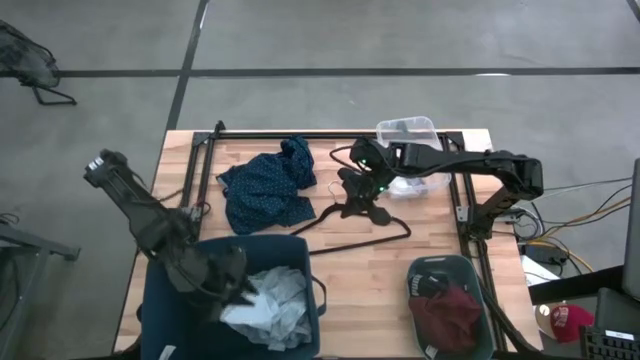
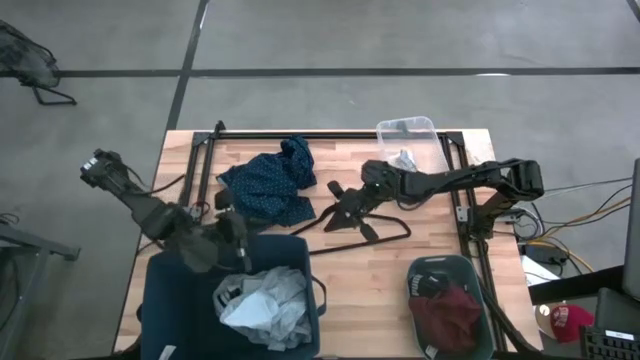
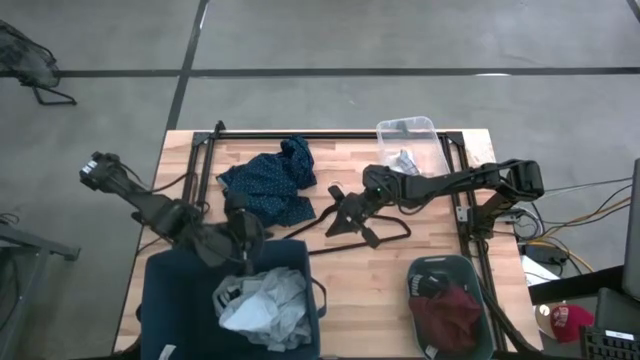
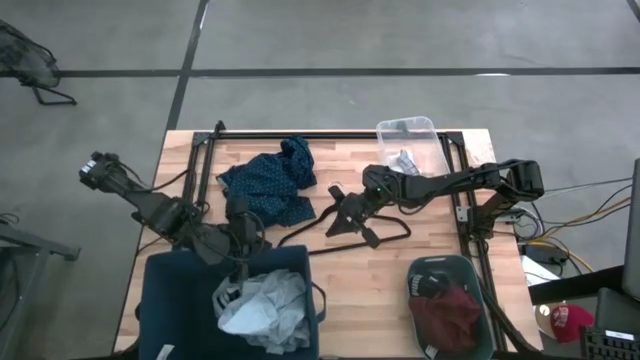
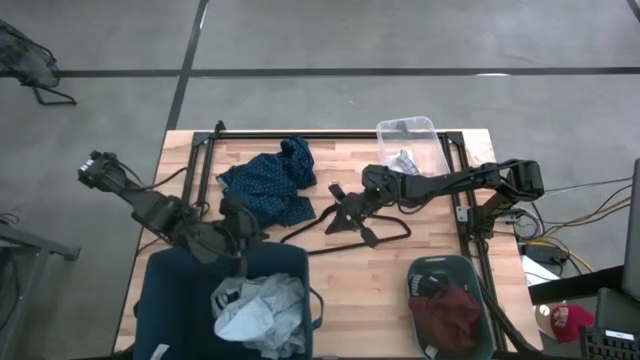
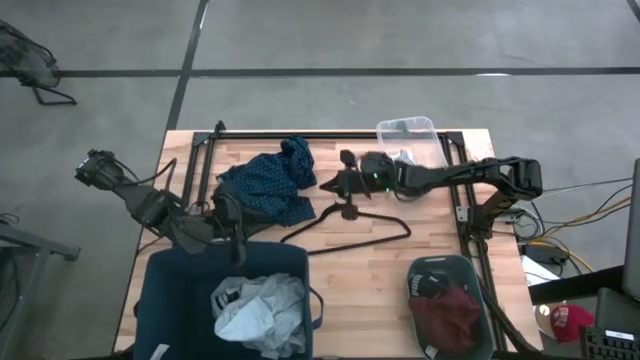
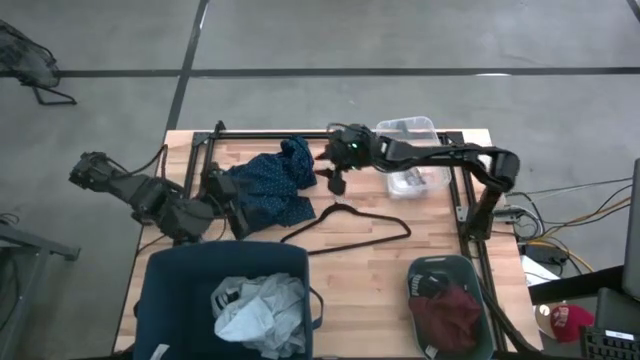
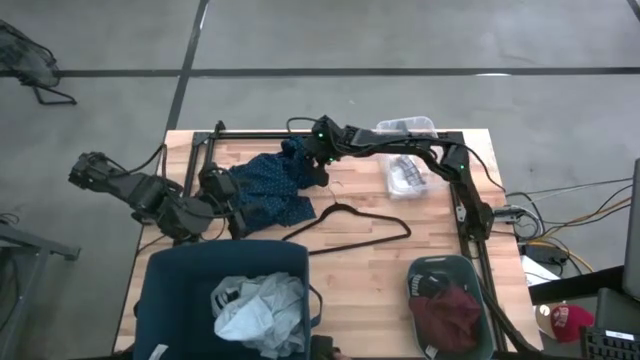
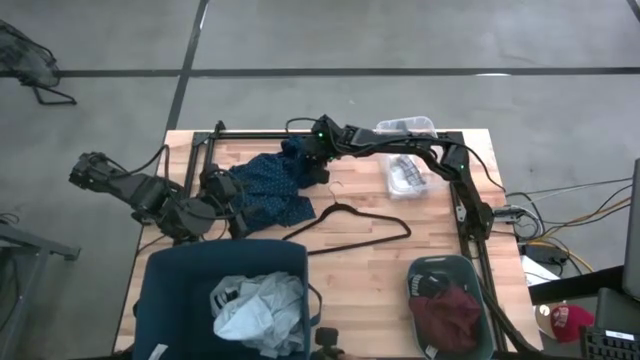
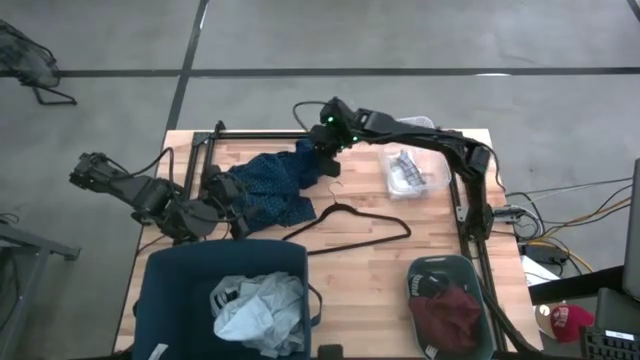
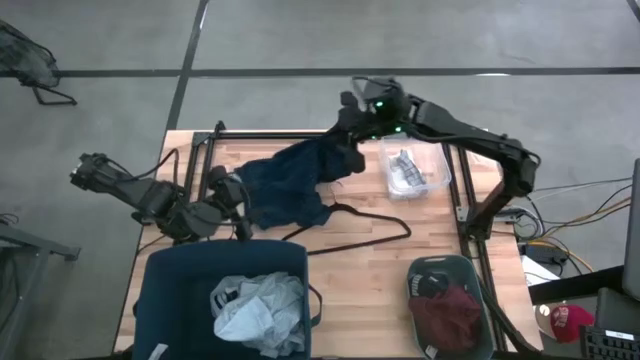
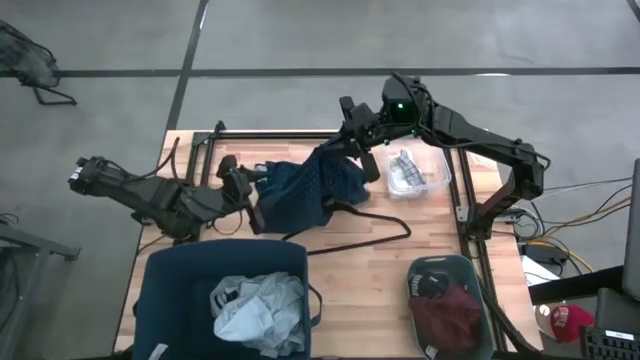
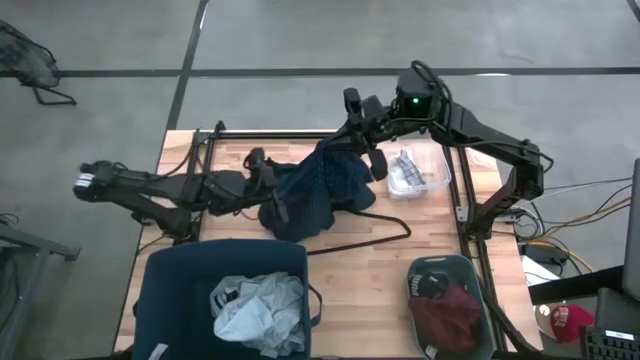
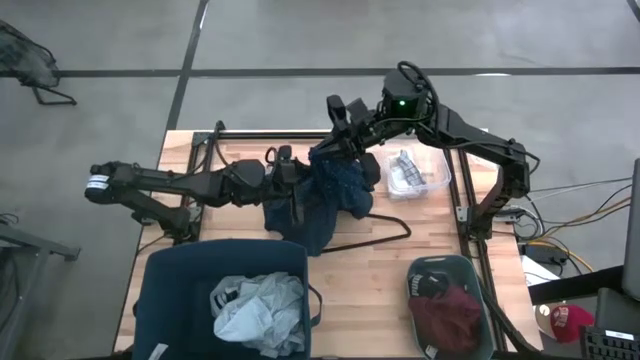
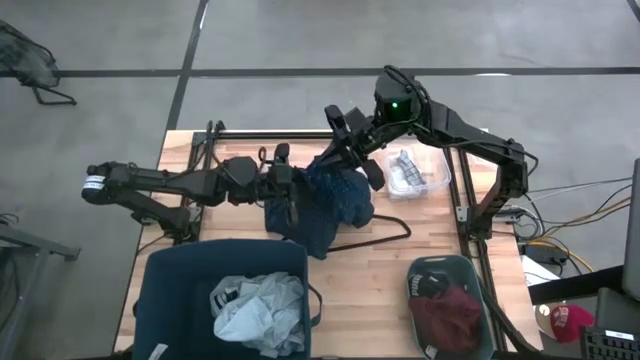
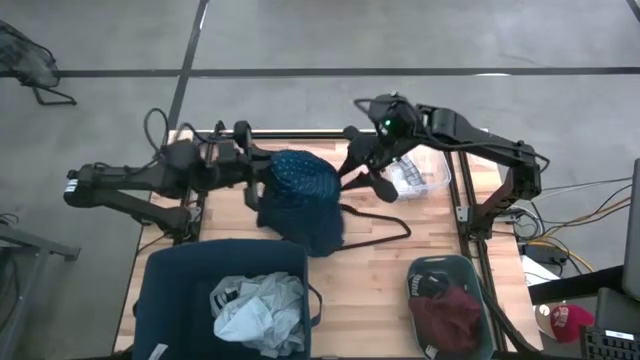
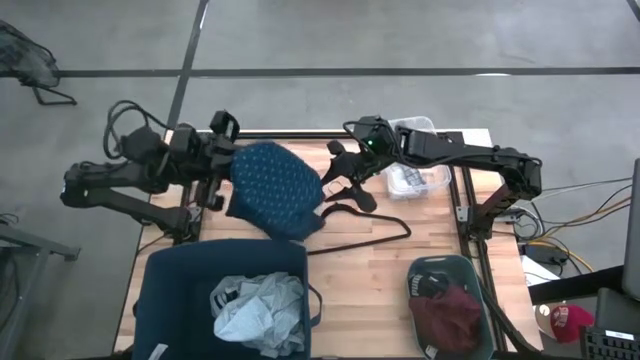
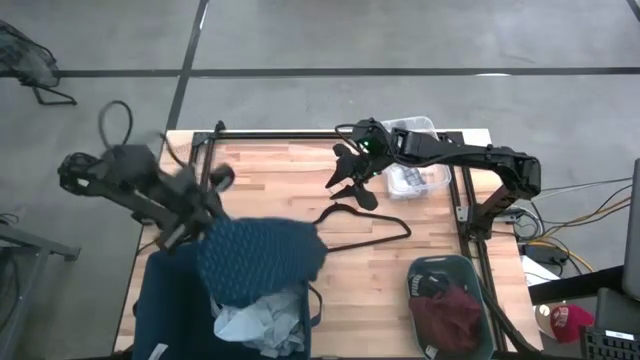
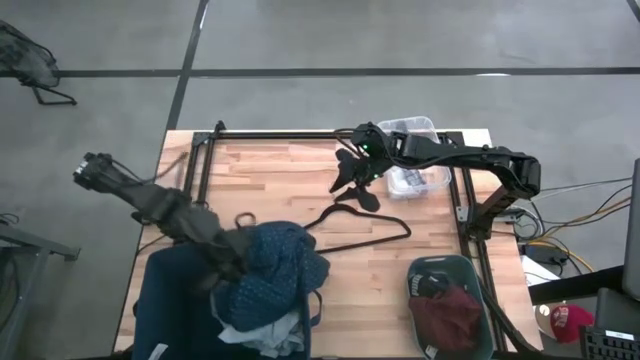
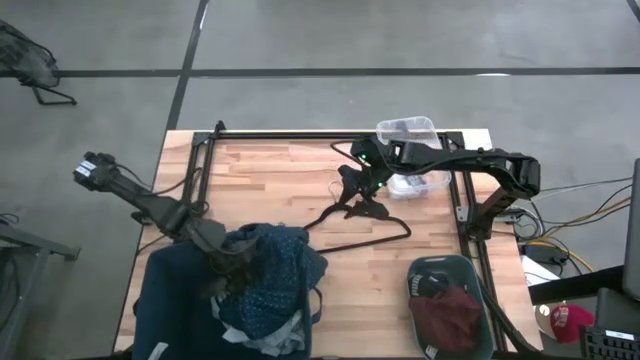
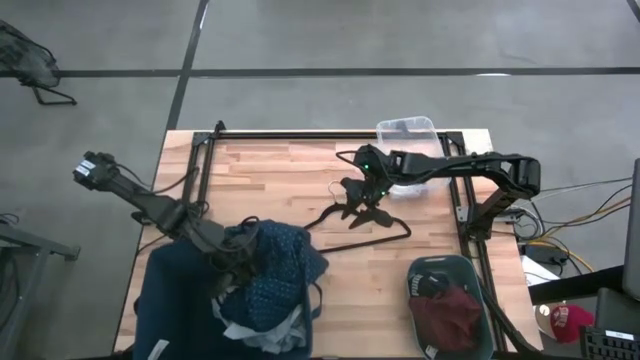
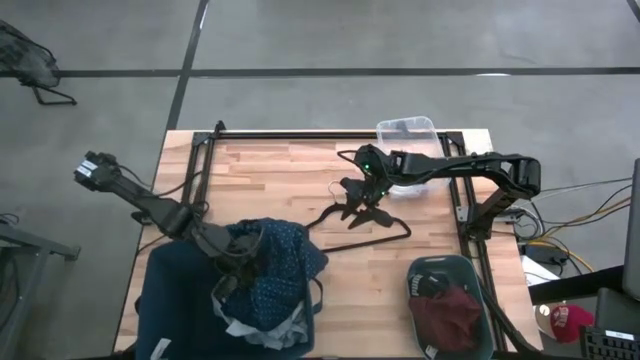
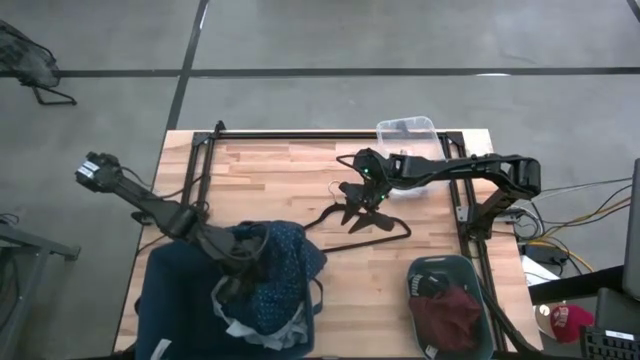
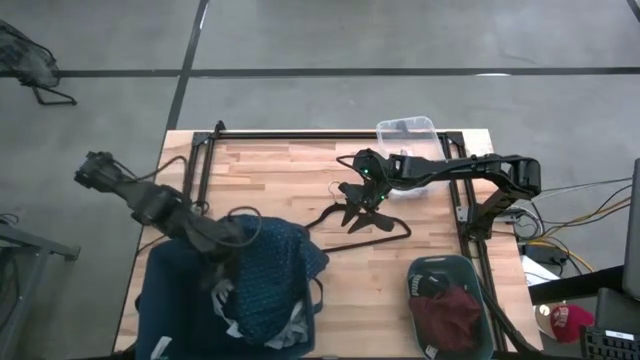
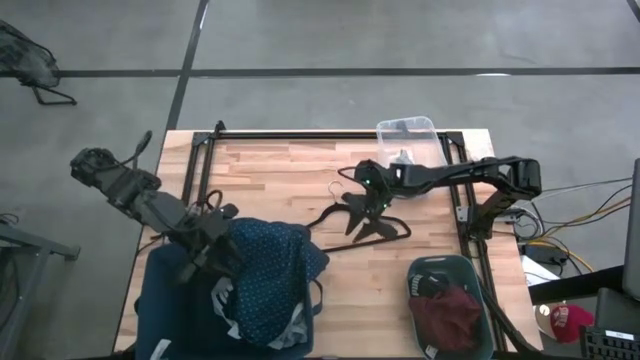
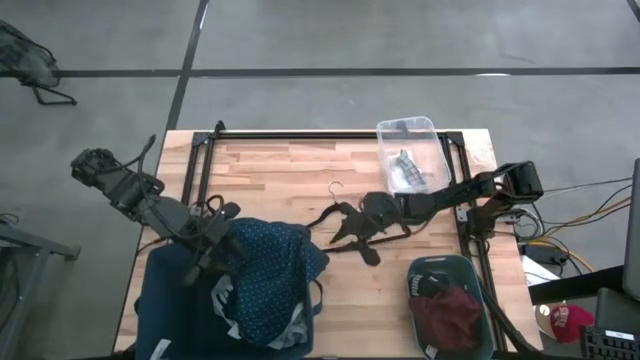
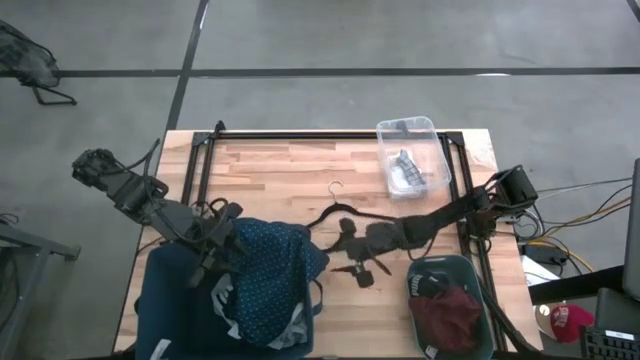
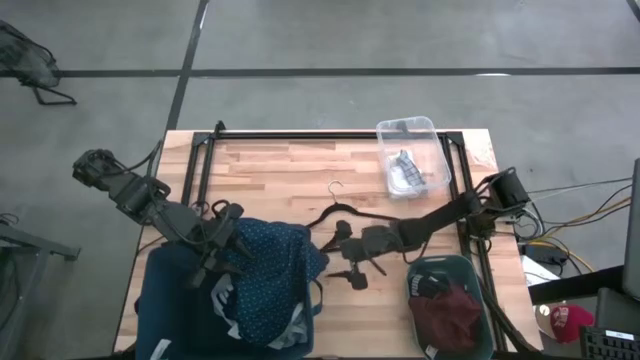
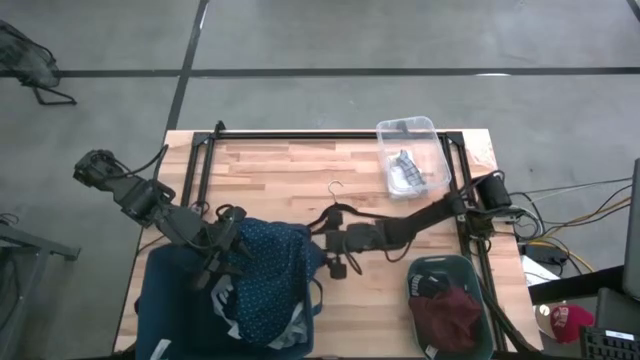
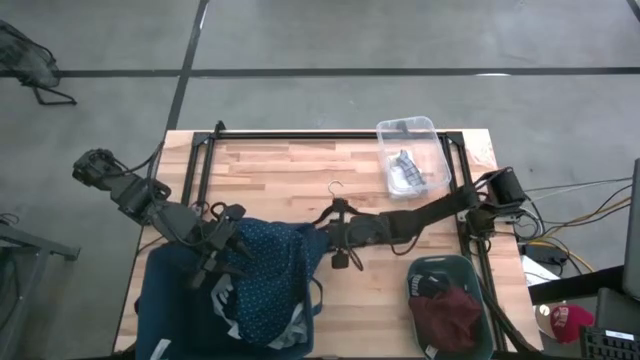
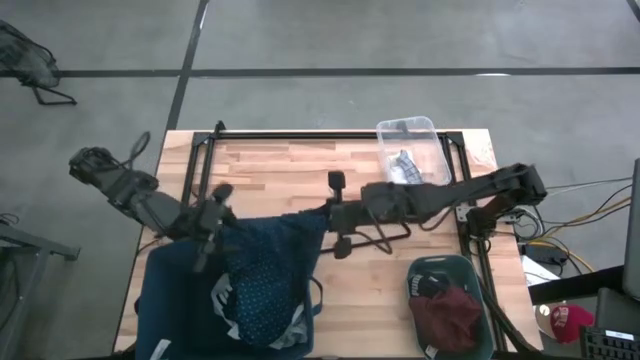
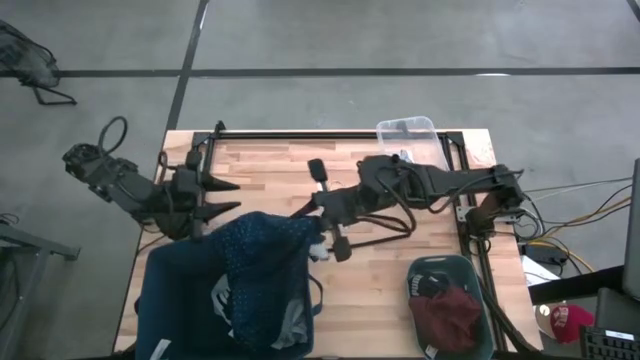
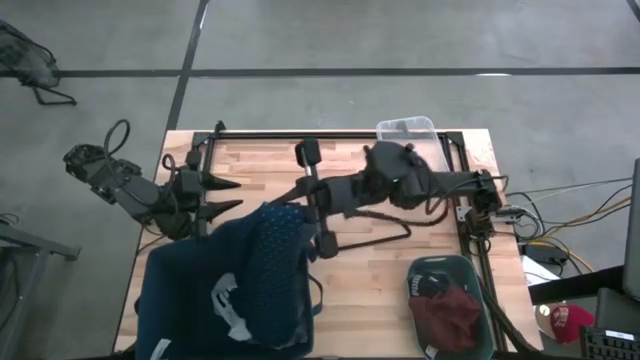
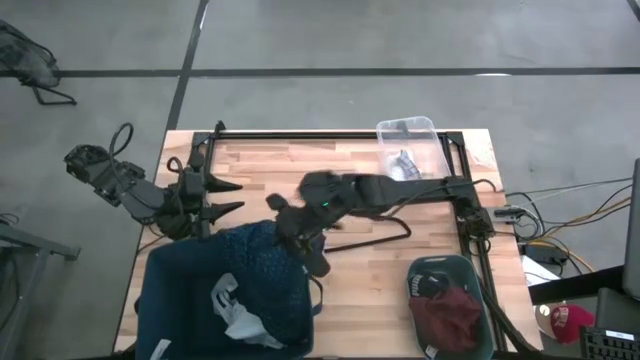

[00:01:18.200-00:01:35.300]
Task: Pick & Place Cloths
Put the blue shirt into the blue laundry bin

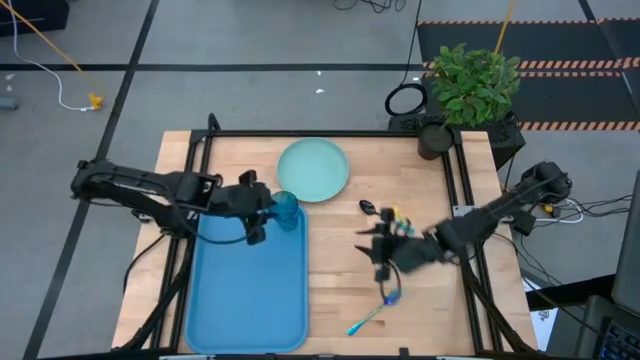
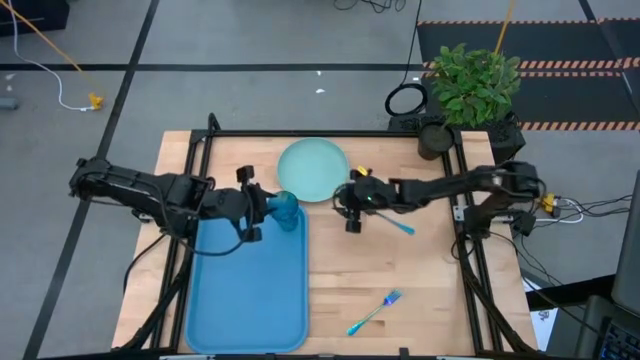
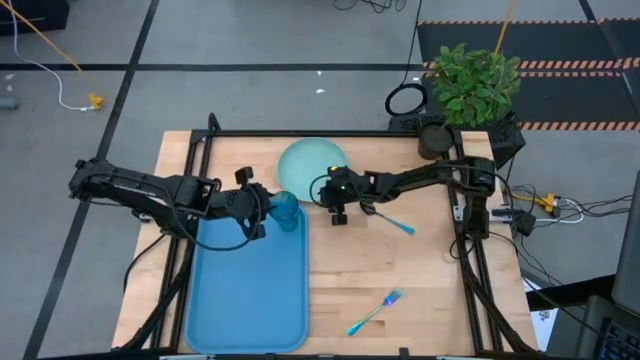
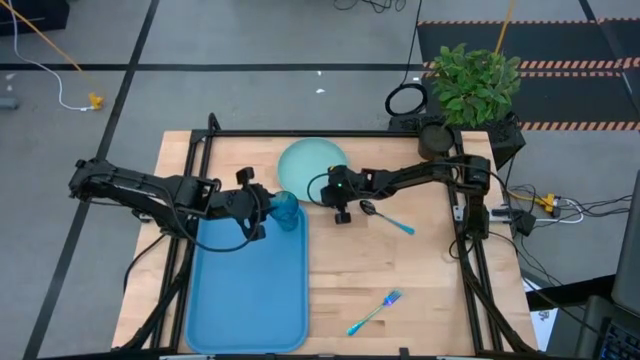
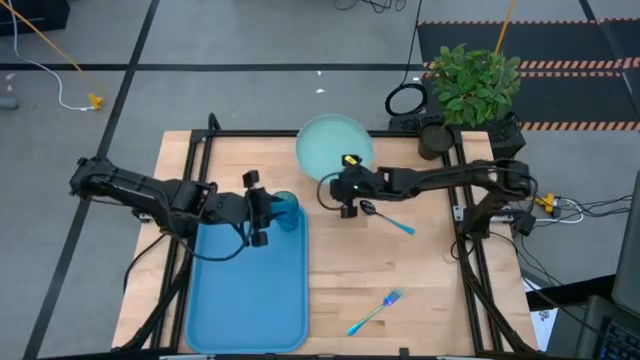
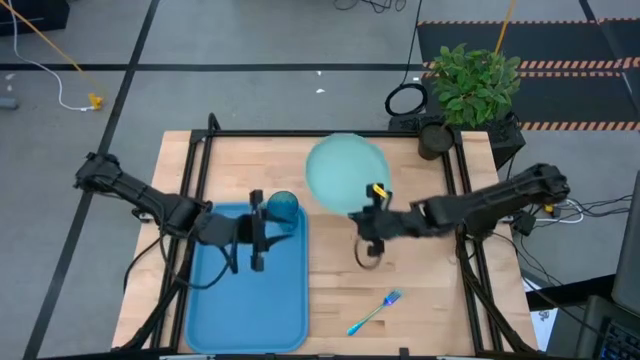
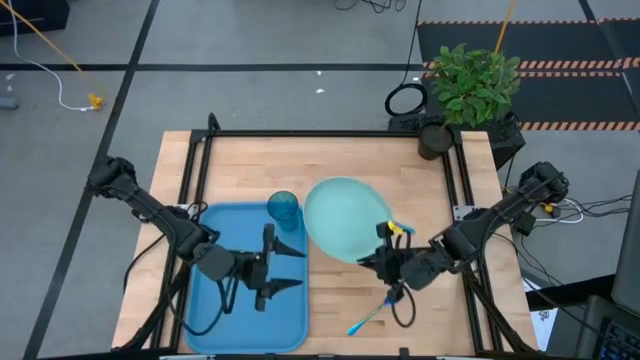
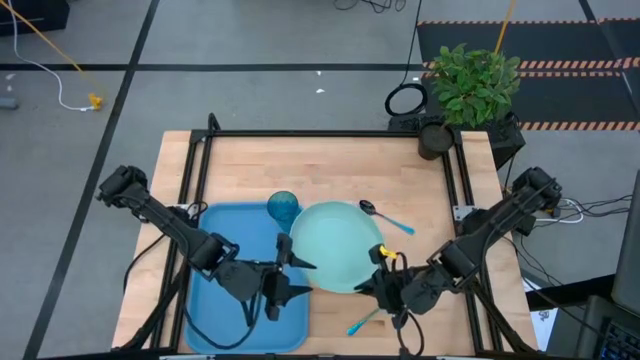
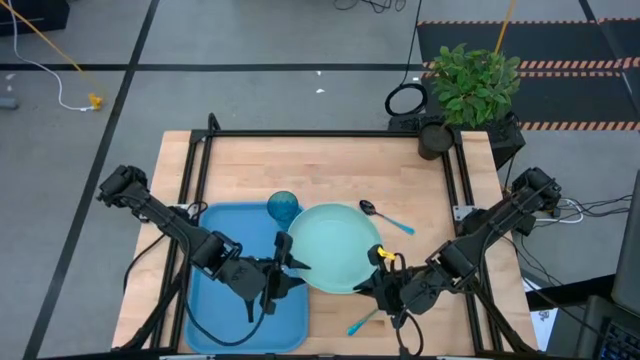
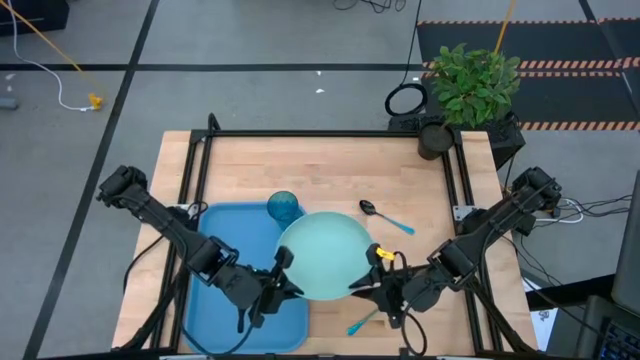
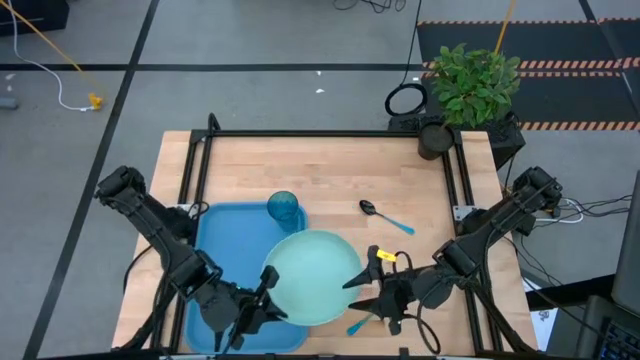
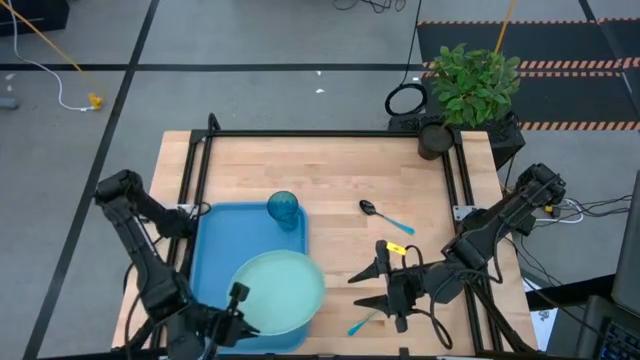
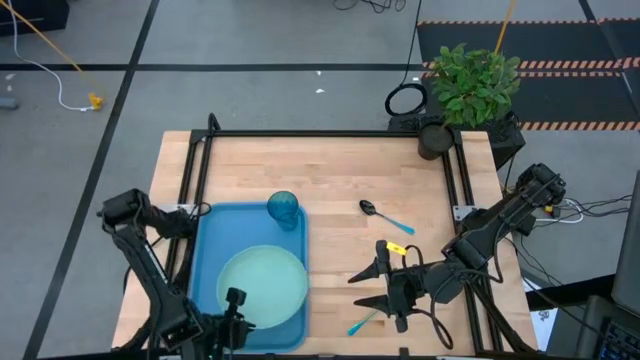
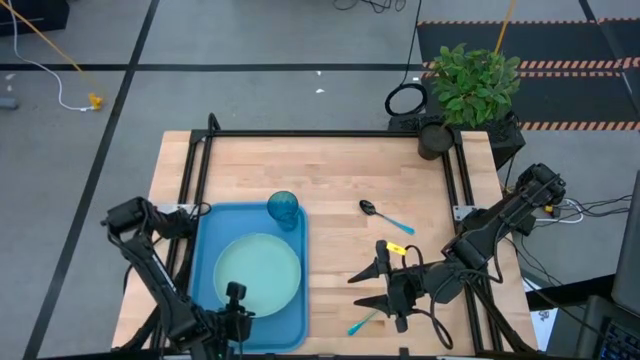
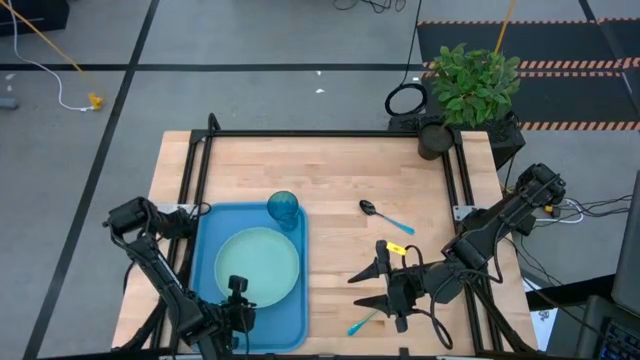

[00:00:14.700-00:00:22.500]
Task: Pick and place plate/cup/fork/spoon on tray
Put the green plate on the blue tray to the bottom left of the blue cup
